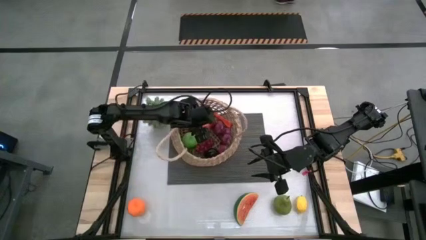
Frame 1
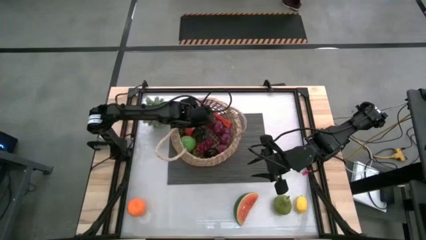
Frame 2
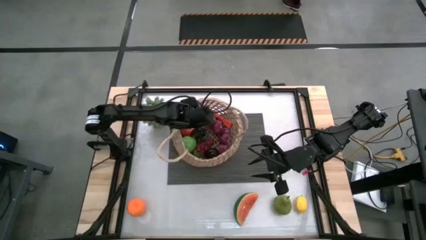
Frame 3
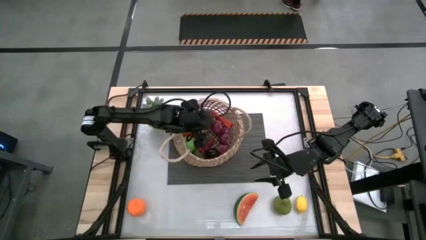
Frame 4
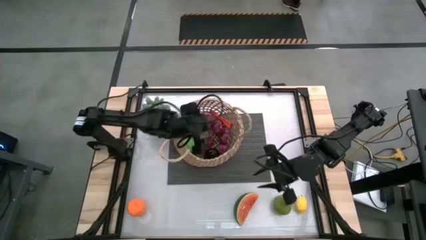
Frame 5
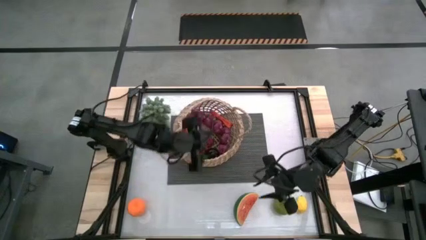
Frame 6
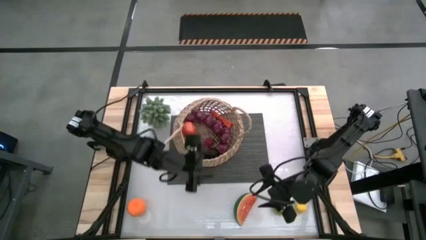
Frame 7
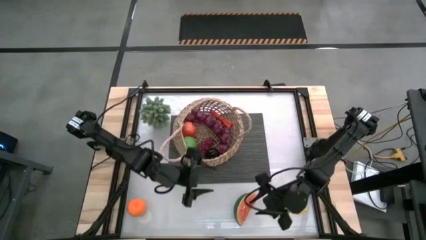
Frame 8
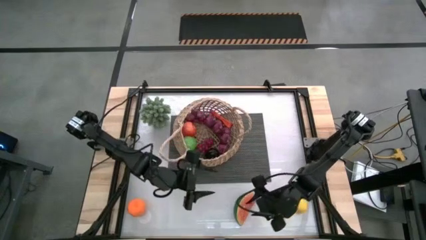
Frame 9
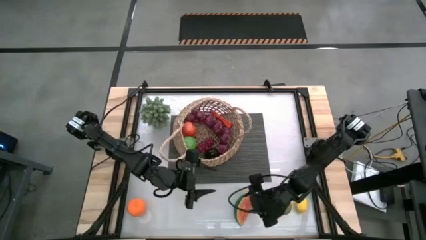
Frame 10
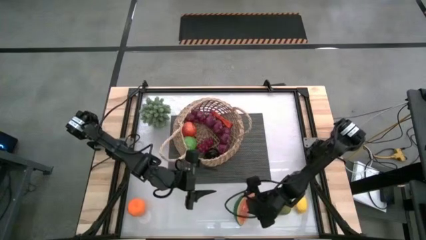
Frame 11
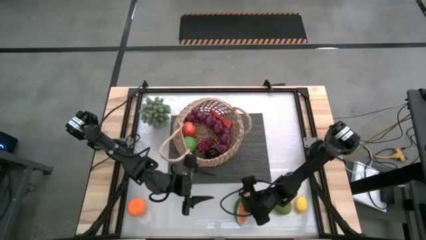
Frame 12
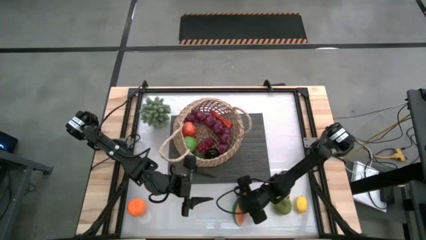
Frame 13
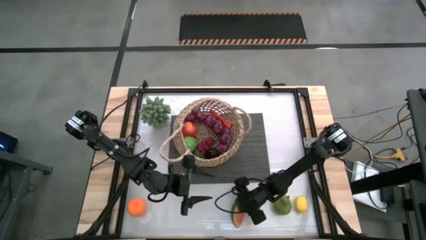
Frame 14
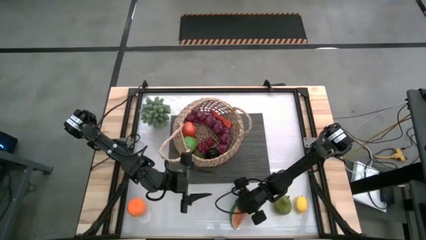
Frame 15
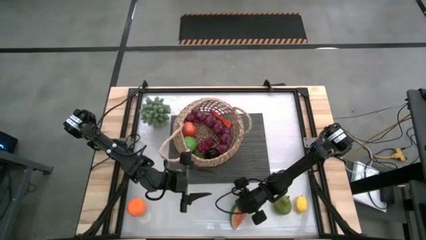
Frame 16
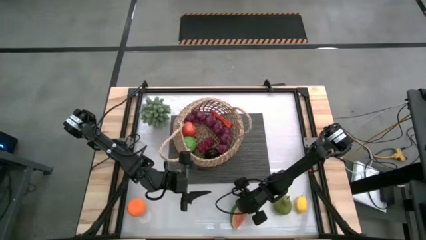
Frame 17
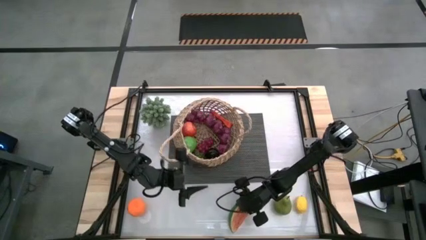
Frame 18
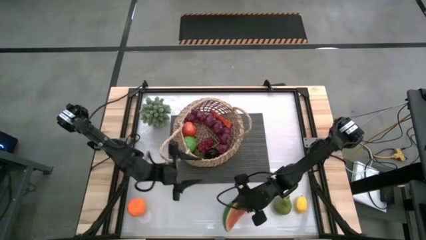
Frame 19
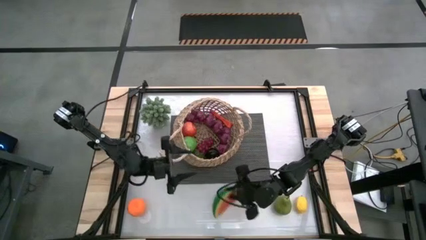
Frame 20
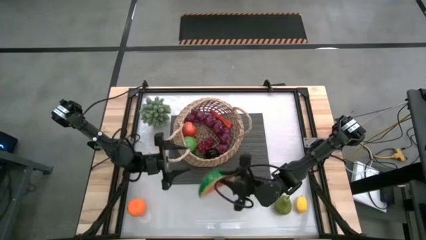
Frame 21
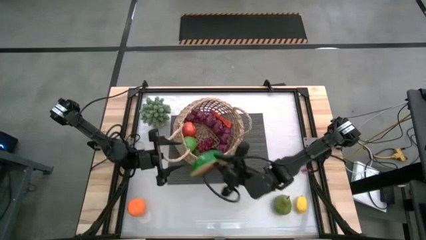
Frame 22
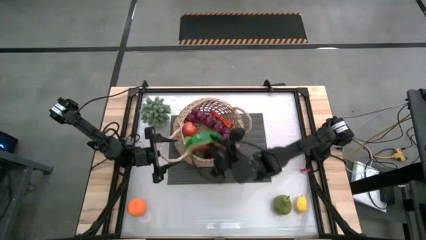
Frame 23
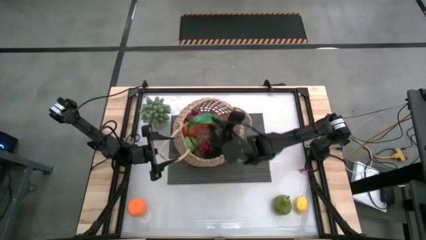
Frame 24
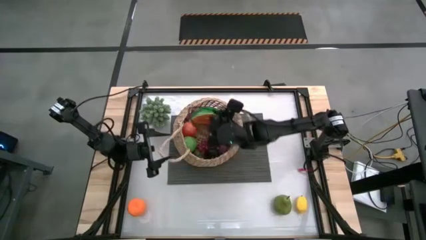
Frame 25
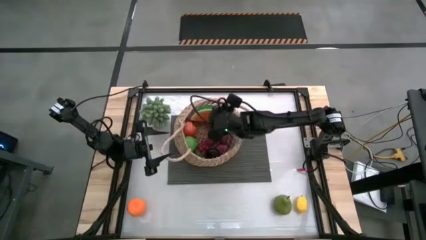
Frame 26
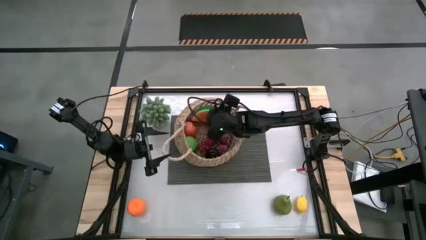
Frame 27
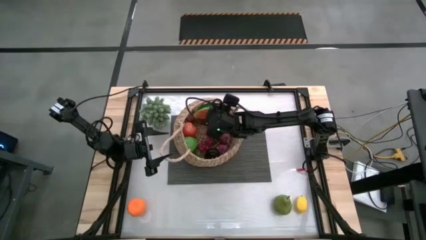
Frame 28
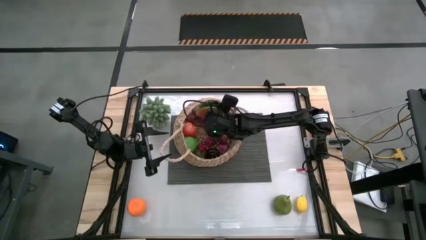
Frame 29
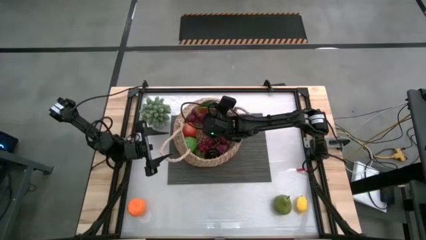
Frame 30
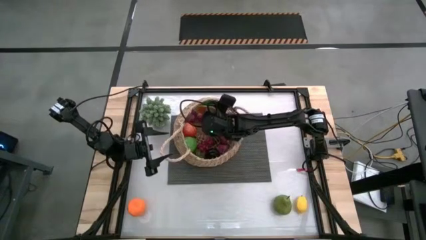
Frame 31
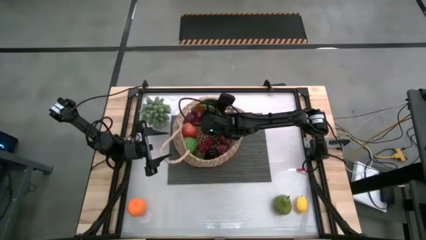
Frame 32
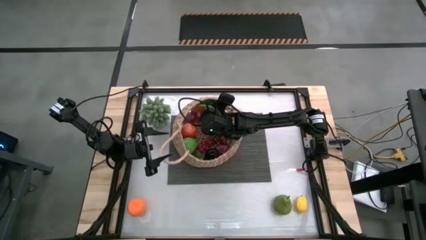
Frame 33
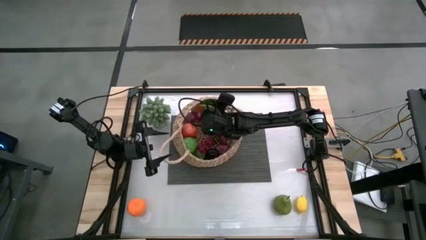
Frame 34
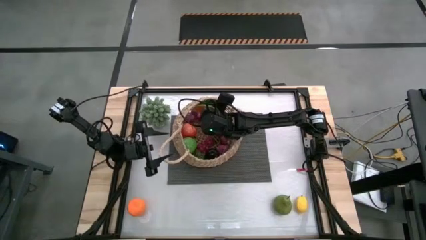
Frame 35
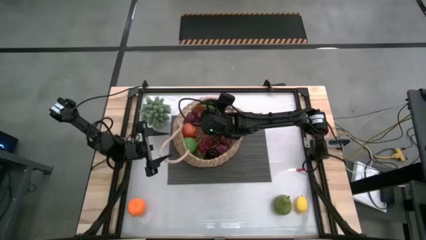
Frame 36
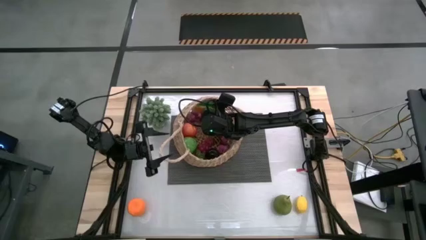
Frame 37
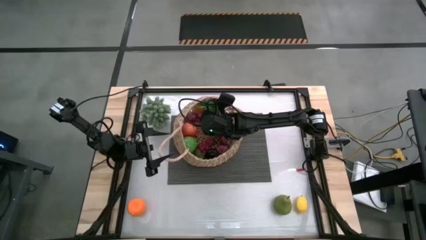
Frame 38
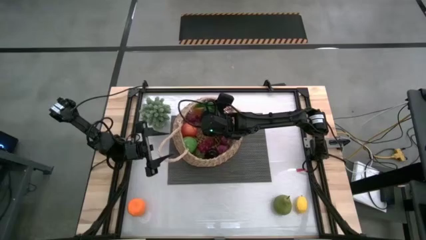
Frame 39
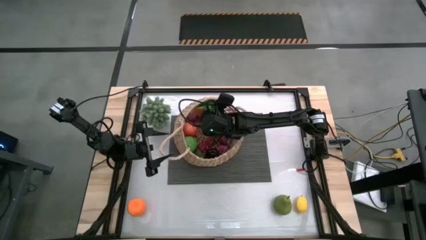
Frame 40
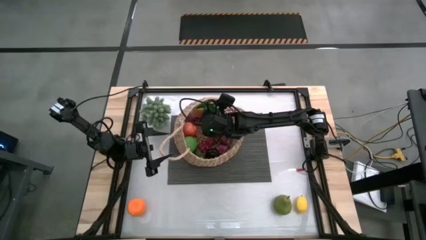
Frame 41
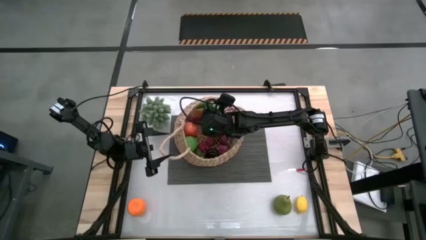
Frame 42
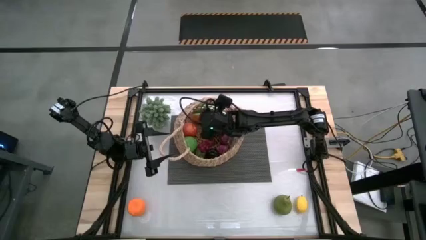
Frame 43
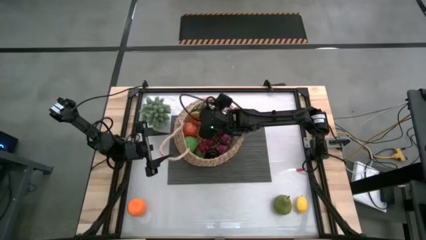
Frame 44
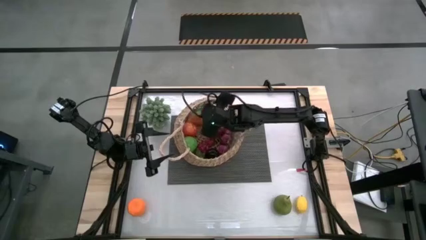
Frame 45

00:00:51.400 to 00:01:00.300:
Task: Build produce basket
Put the red watermelon into the brown basket

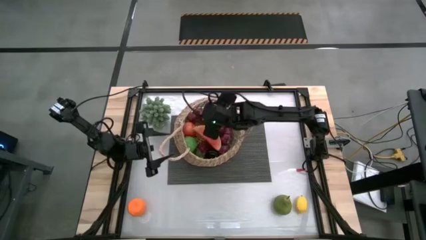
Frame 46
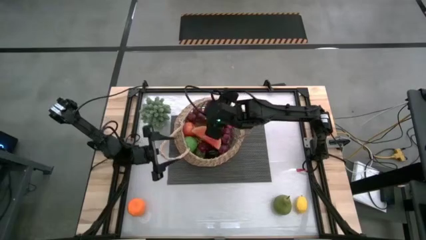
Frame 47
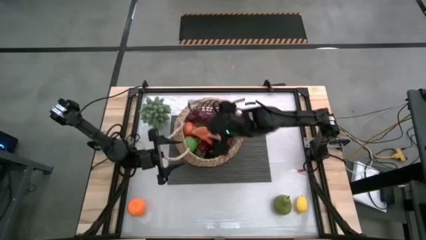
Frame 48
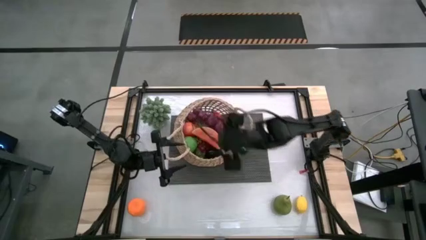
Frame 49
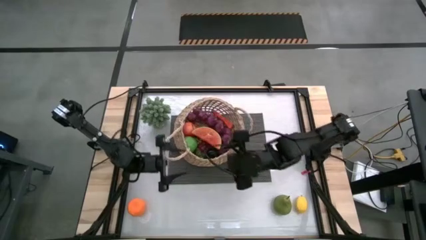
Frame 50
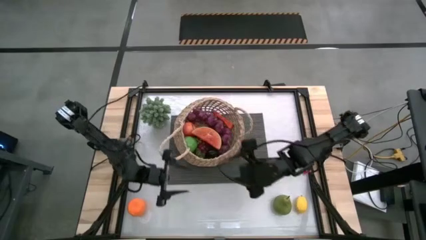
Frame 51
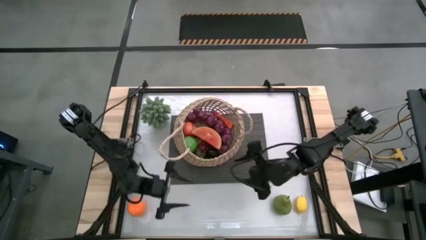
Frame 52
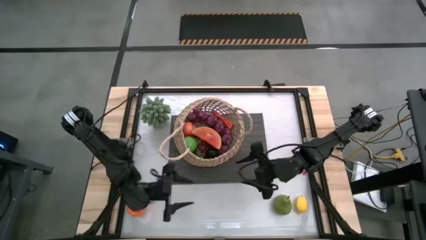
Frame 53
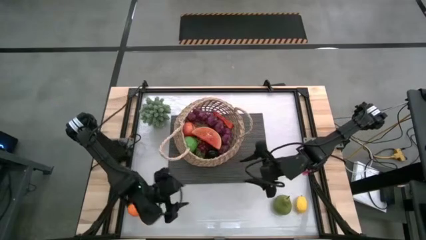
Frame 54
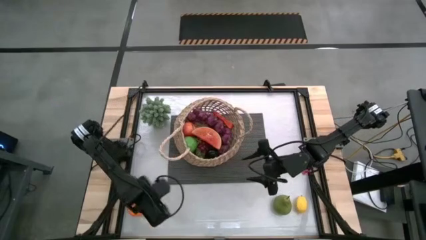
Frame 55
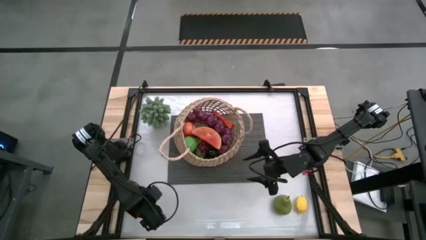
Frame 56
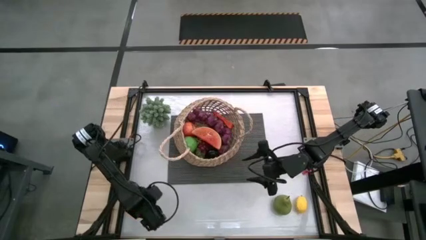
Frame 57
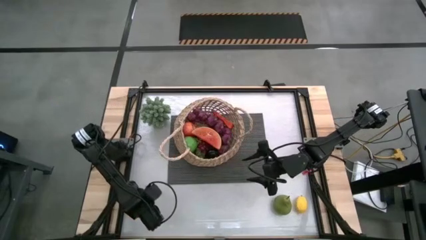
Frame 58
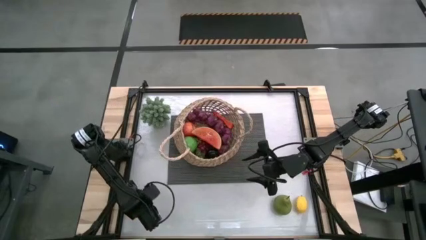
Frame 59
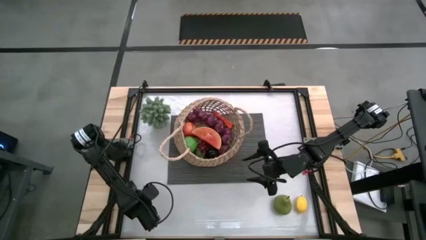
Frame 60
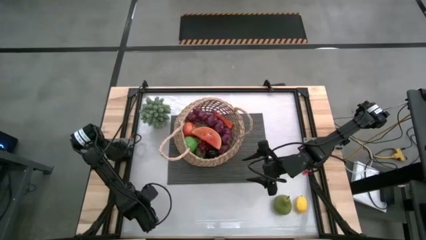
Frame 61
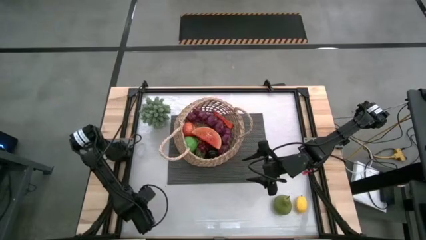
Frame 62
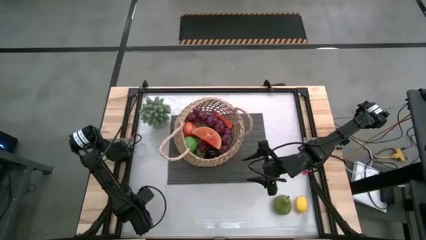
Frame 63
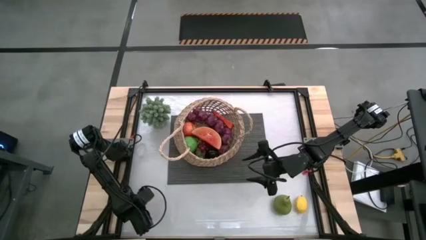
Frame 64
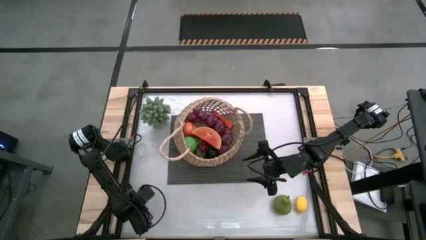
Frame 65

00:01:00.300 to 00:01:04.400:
Put the orange into the brown basket

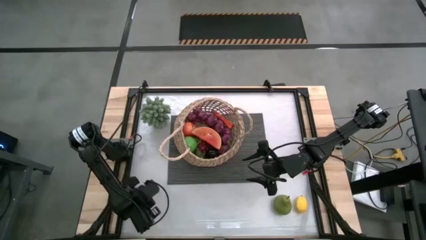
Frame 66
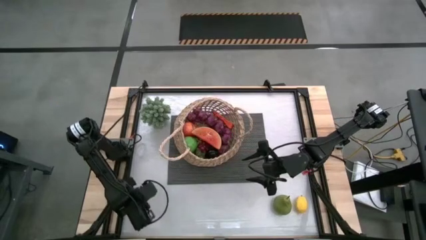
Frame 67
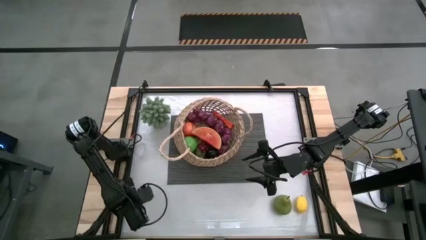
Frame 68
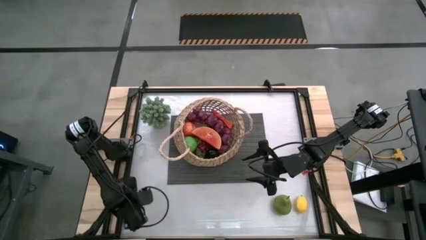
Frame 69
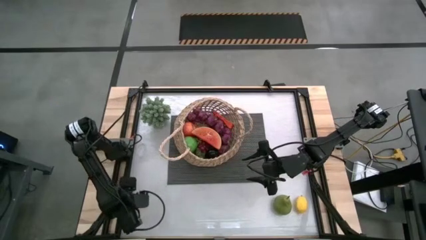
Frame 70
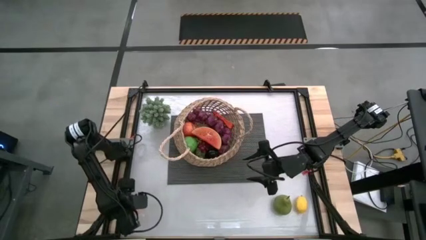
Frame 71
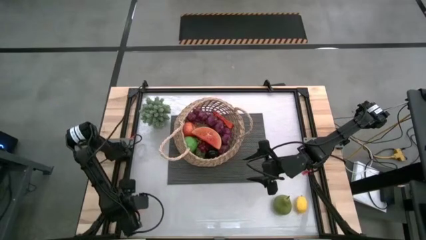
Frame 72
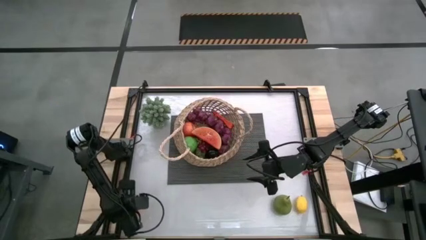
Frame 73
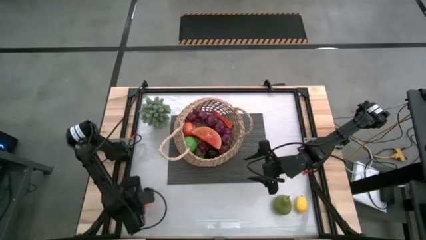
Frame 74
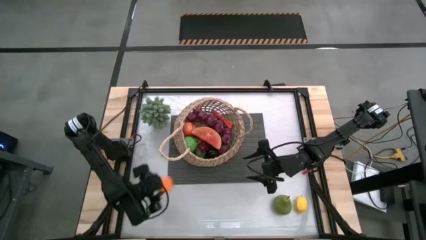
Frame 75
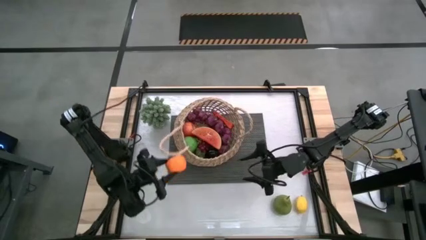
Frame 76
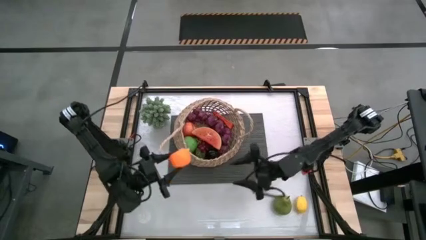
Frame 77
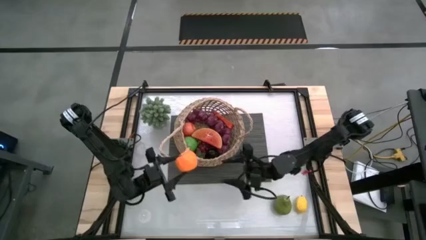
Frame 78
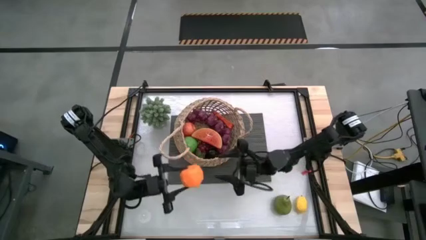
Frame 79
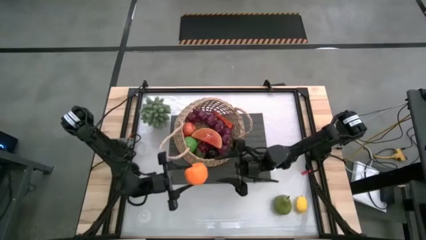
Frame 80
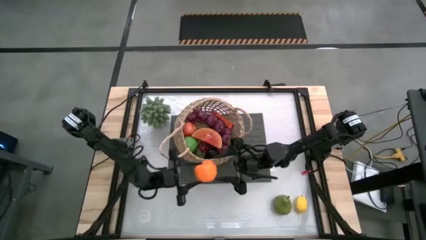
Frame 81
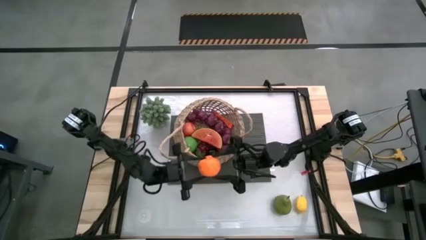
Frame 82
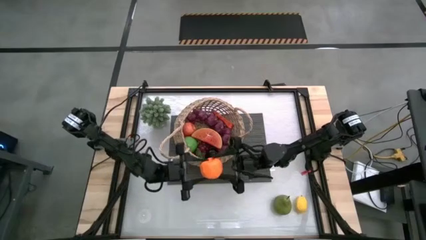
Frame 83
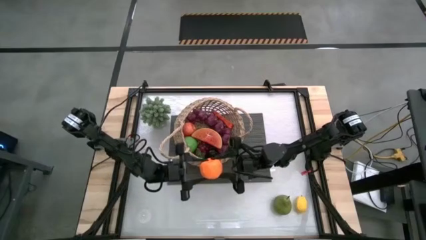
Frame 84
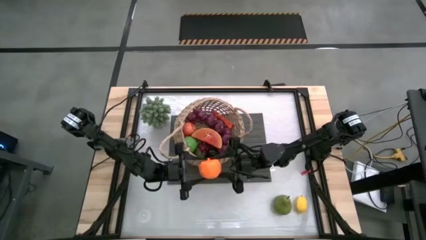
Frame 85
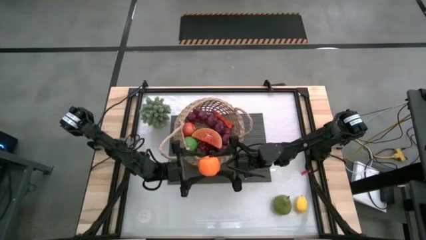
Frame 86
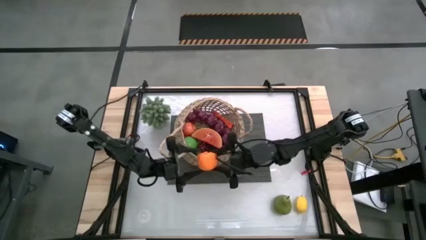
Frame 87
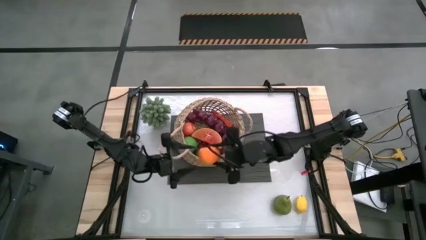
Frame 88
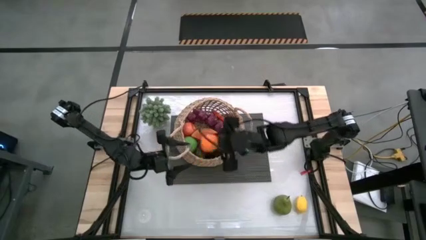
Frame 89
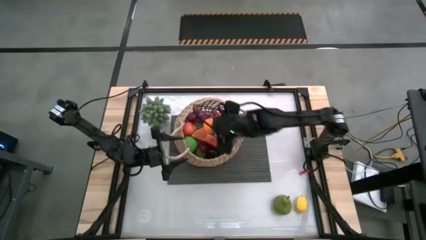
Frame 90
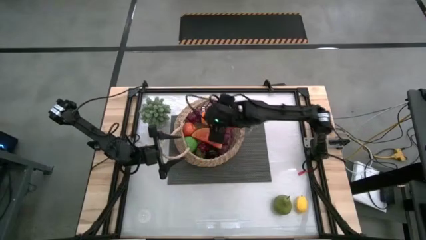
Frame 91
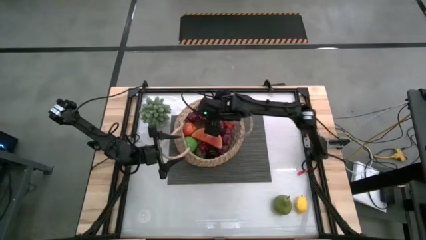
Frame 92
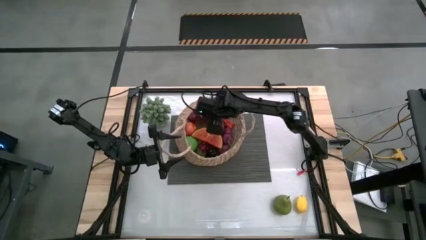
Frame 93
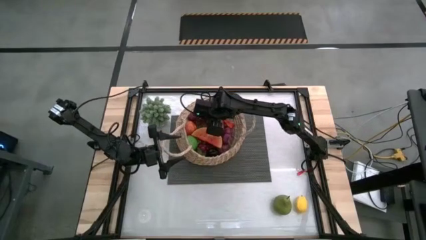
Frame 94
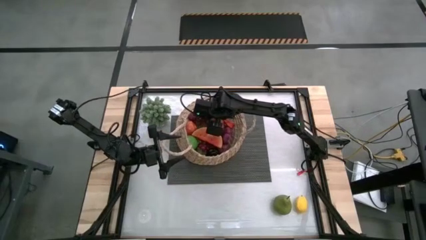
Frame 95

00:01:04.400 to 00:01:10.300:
Put the orange into the brown basket
